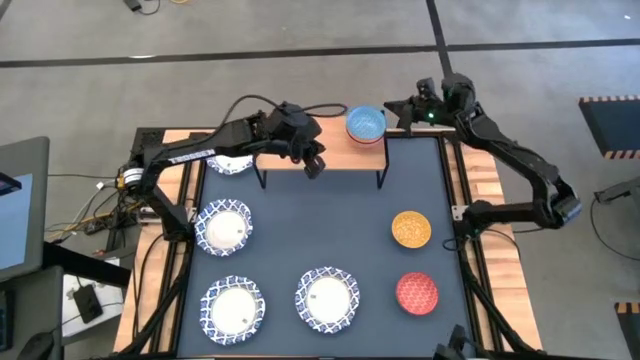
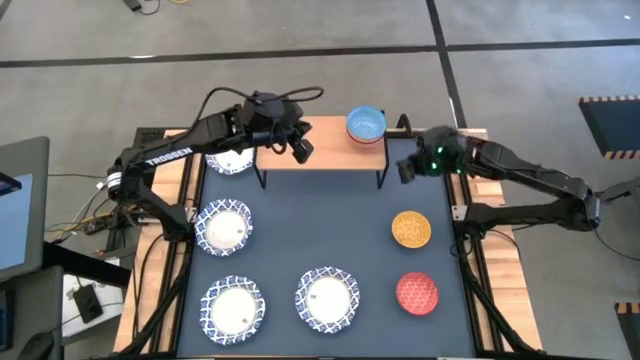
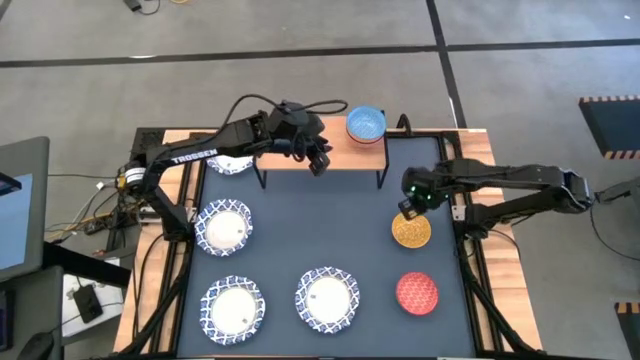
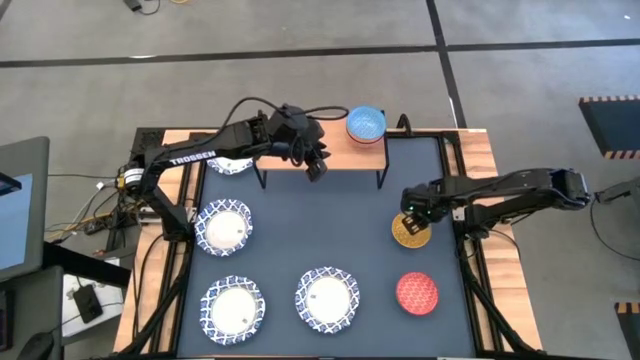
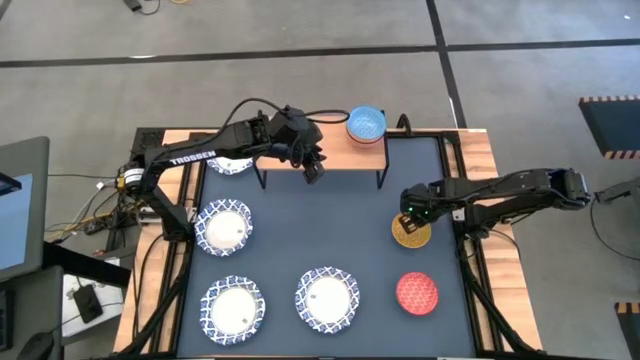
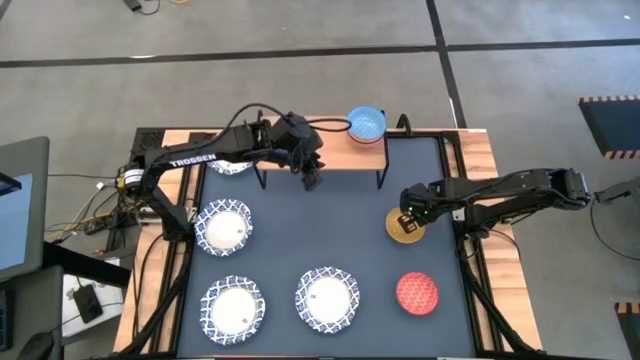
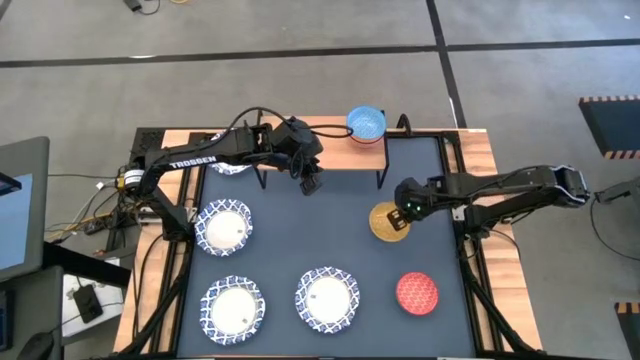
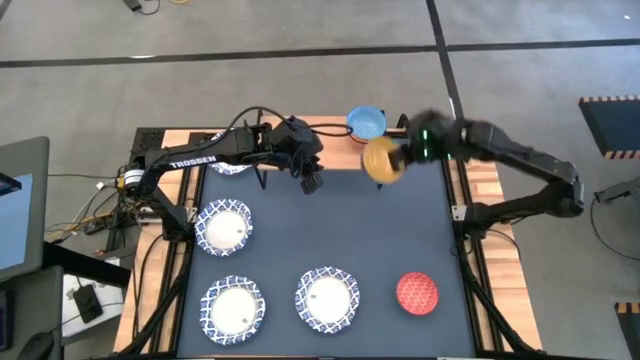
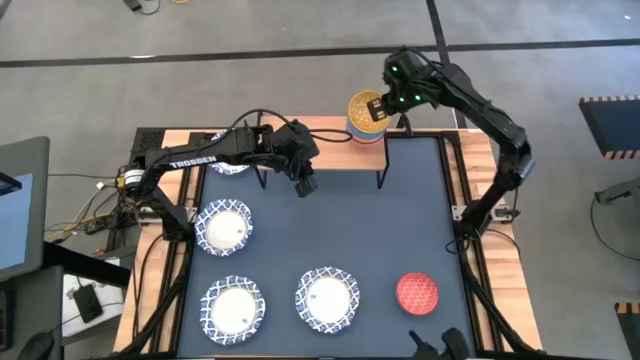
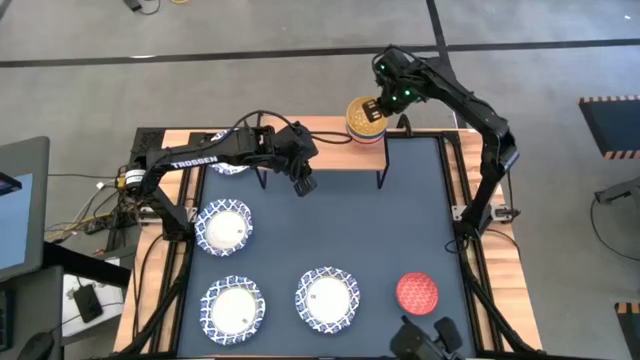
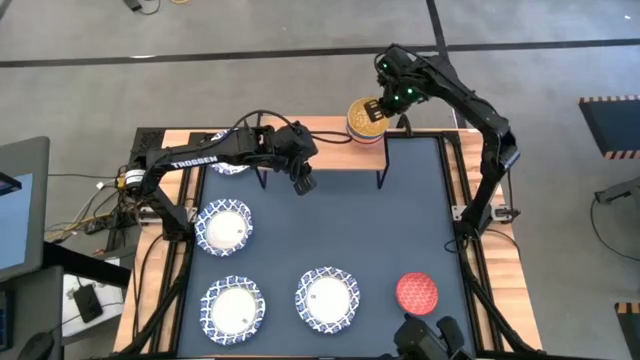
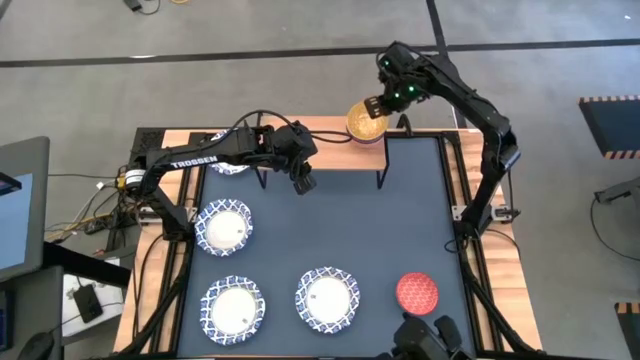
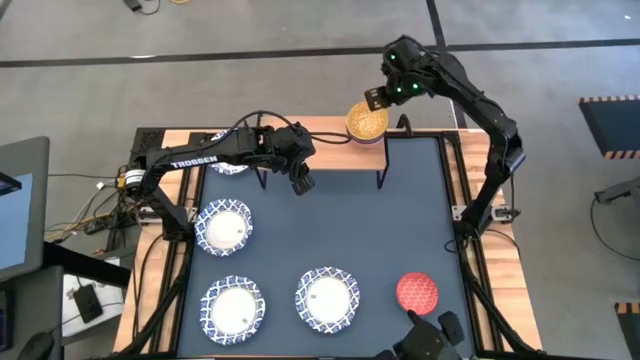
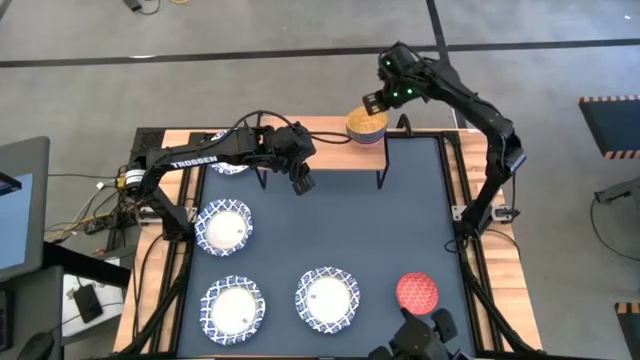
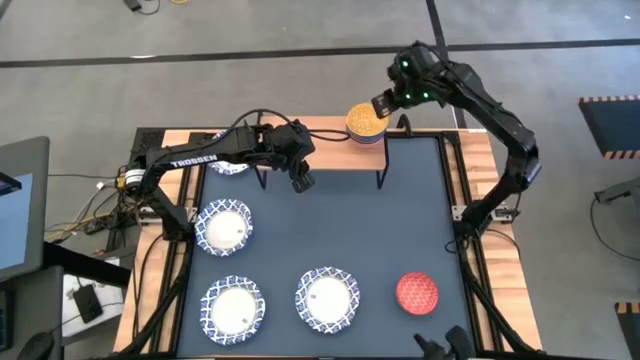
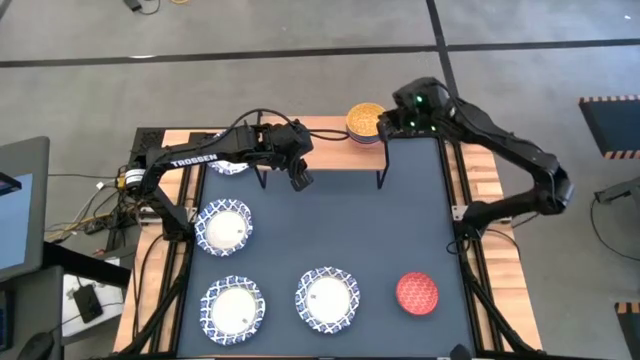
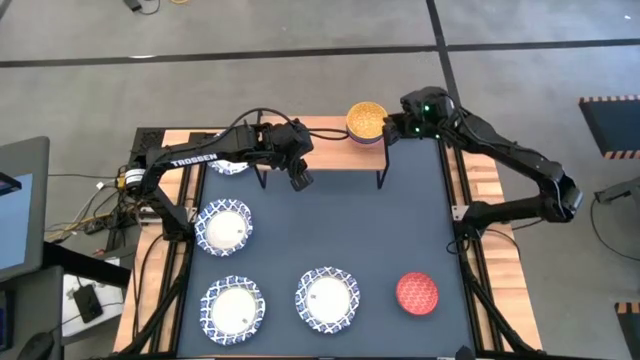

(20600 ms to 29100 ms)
Task: Place and stack bowls onto a shelf
Stack the yellow bowl on top of the light blue bowl on the shelf

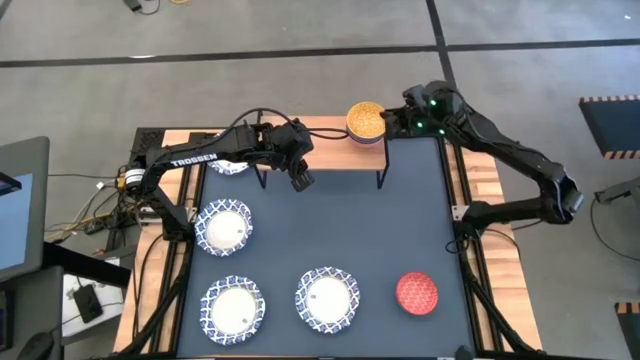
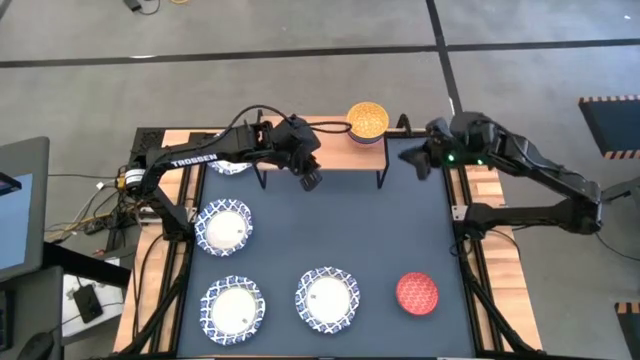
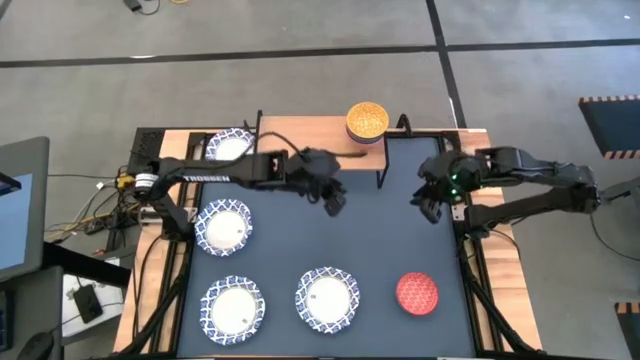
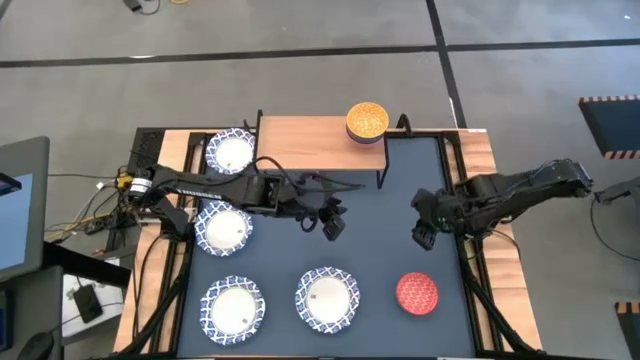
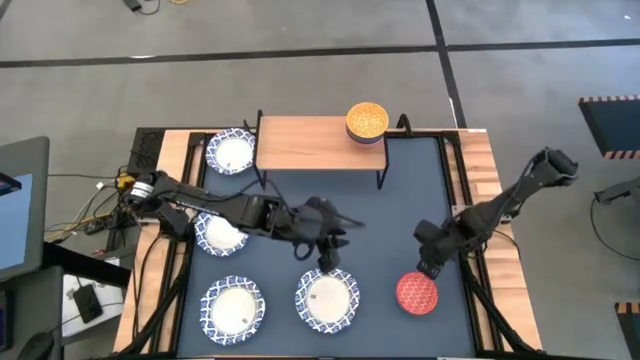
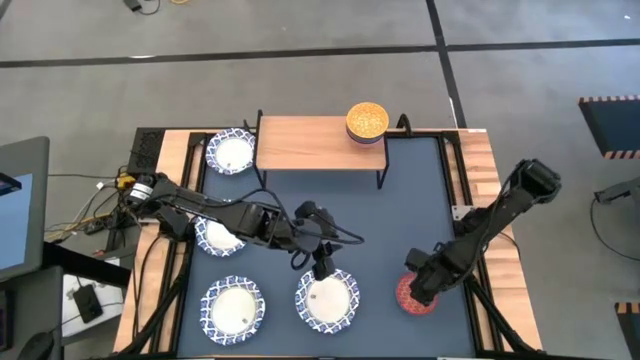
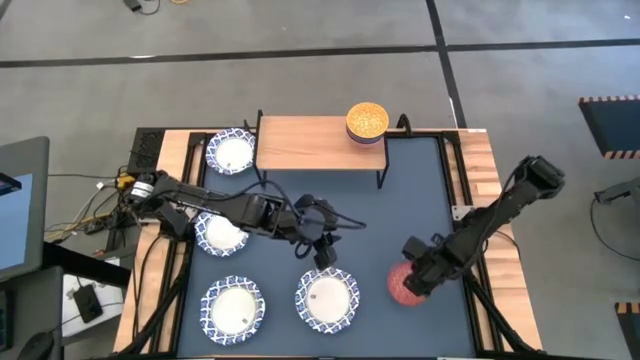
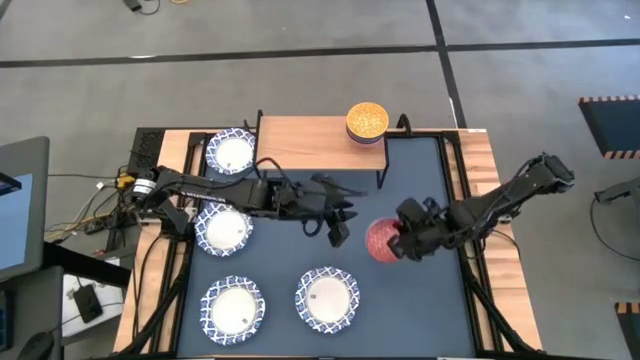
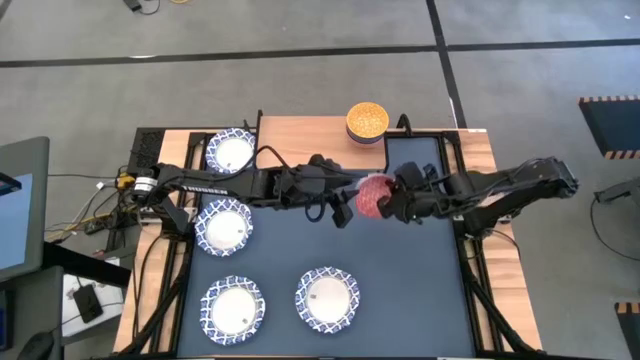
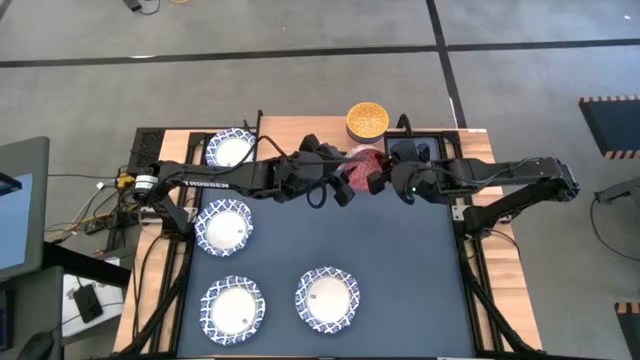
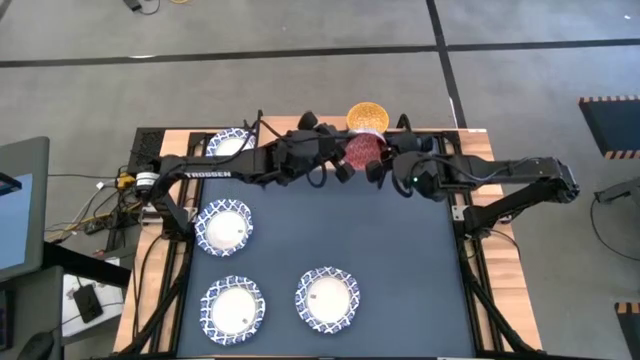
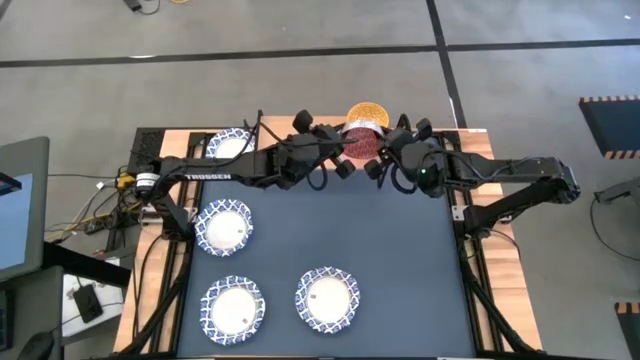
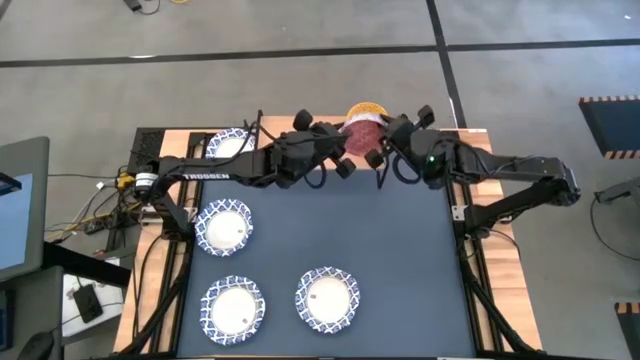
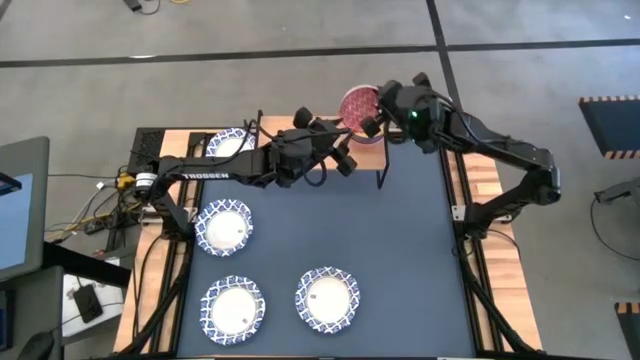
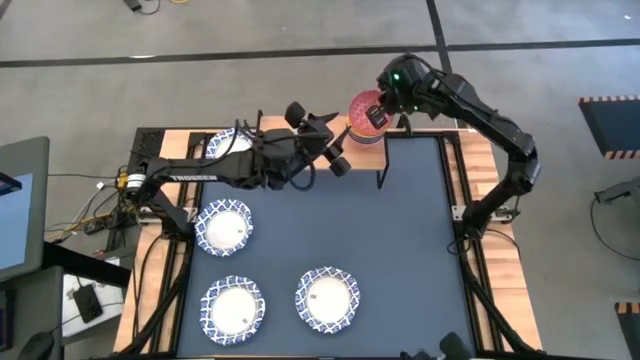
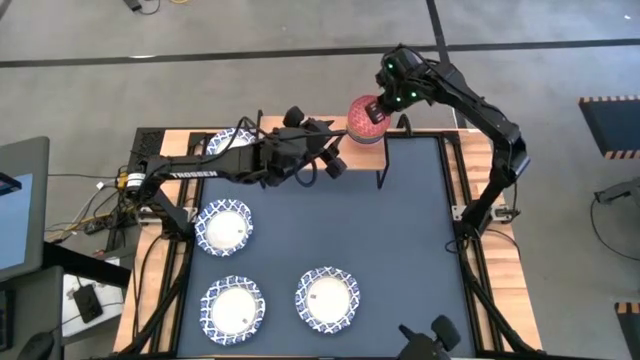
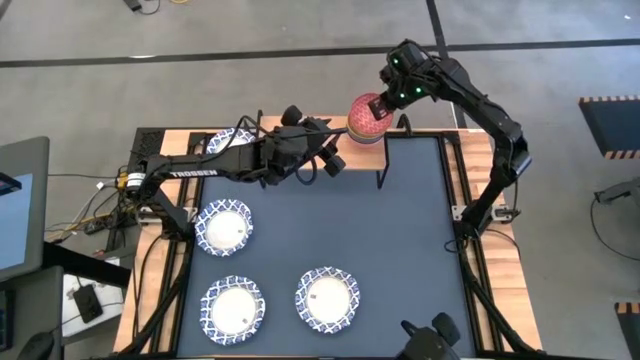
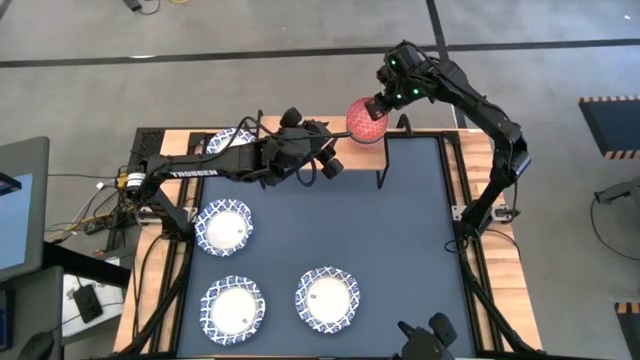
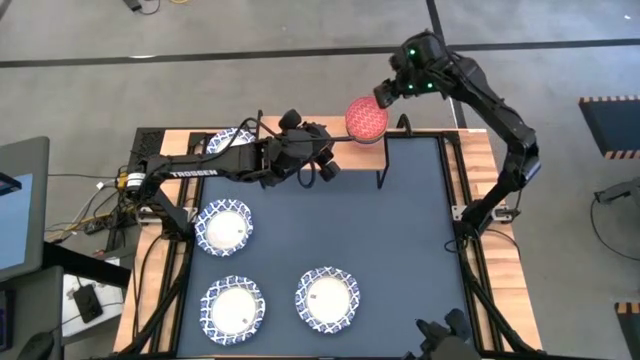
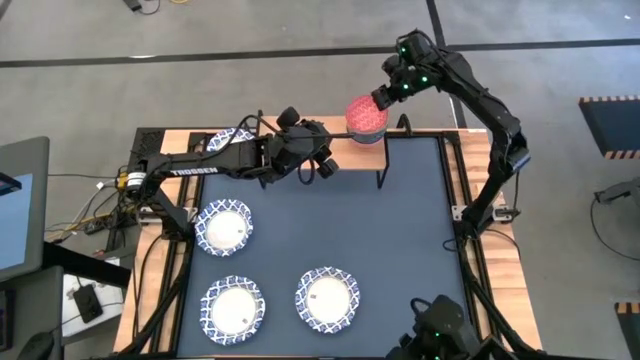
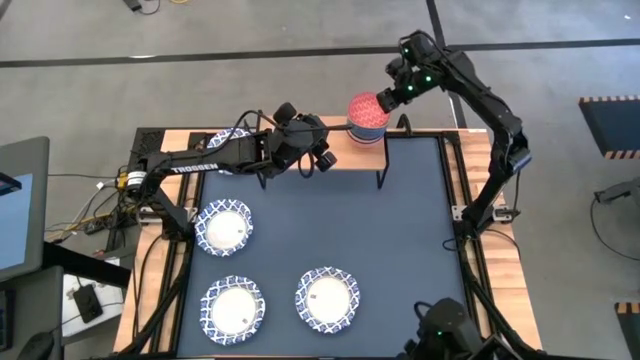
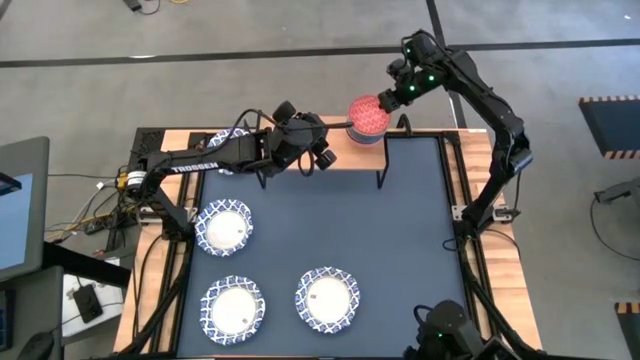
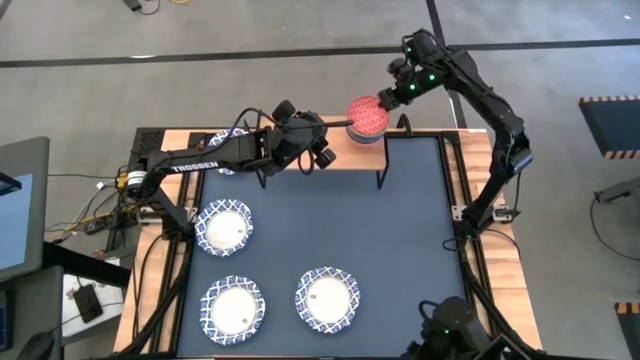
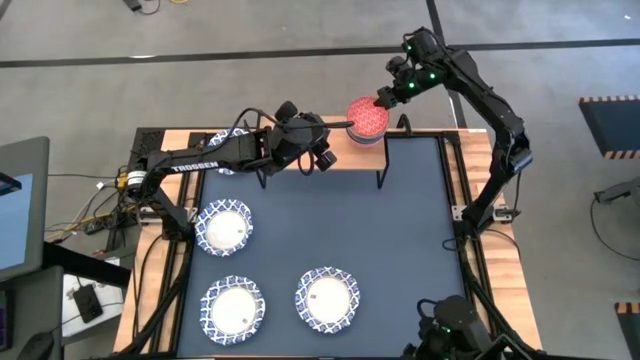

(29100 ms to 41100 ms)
Stack the red bowl on top of the yellow bowl on the shelf

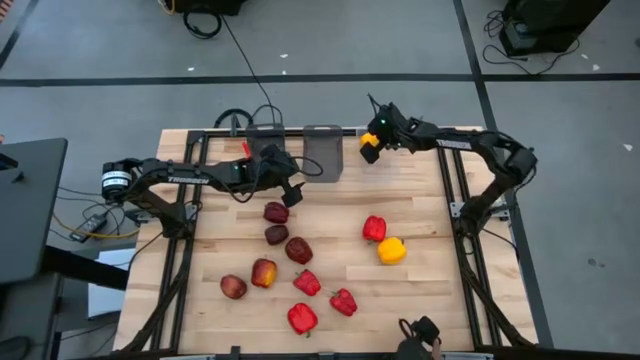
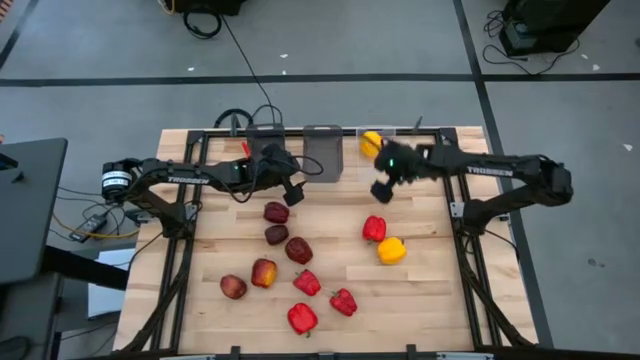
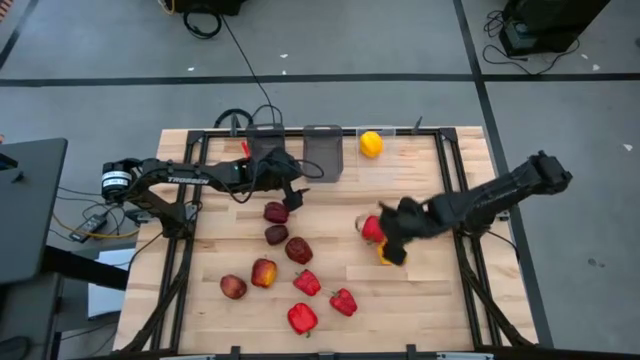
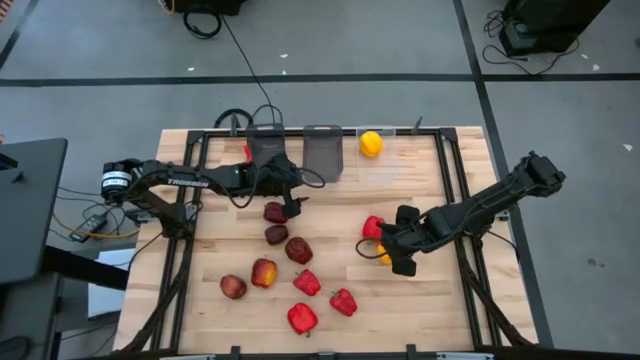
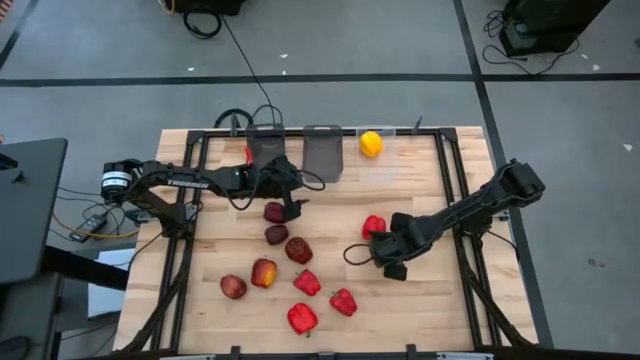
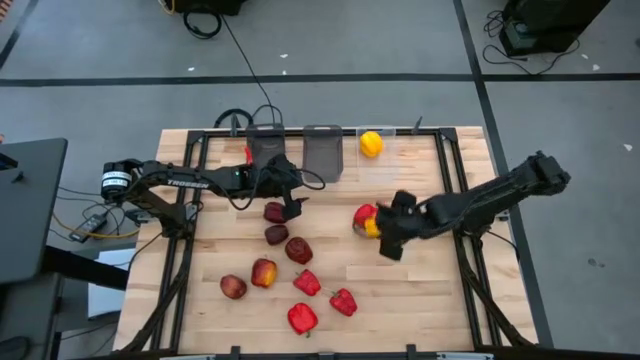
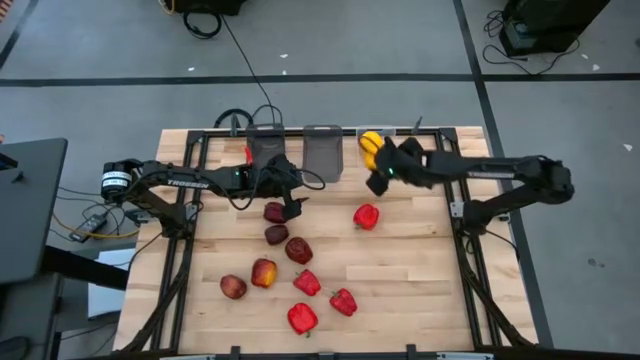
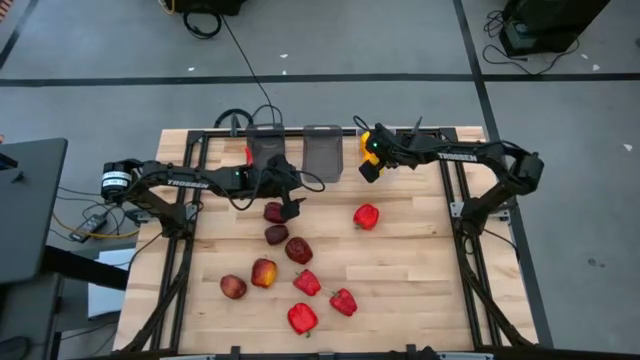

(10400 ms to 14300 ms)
Task: Sort produce into baskets
Put the yellow bell pepper into the transparent bin
